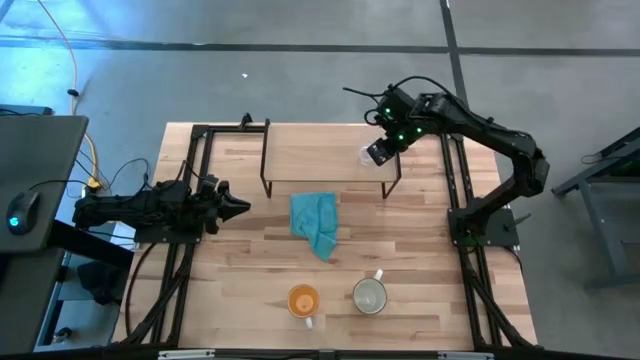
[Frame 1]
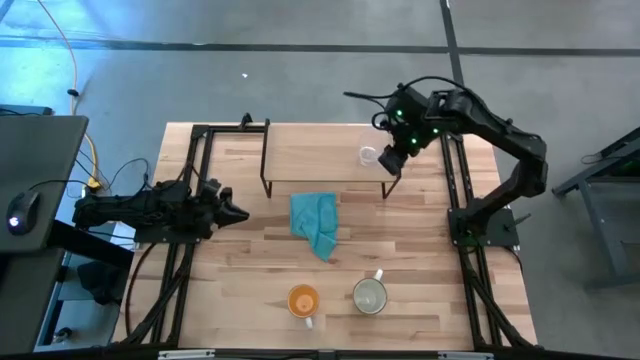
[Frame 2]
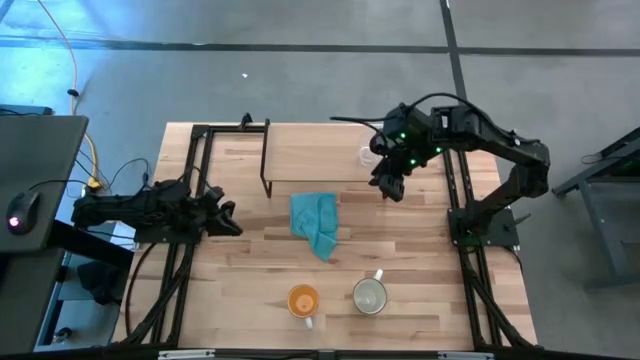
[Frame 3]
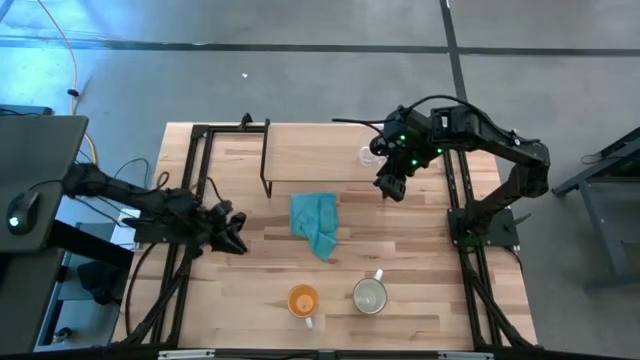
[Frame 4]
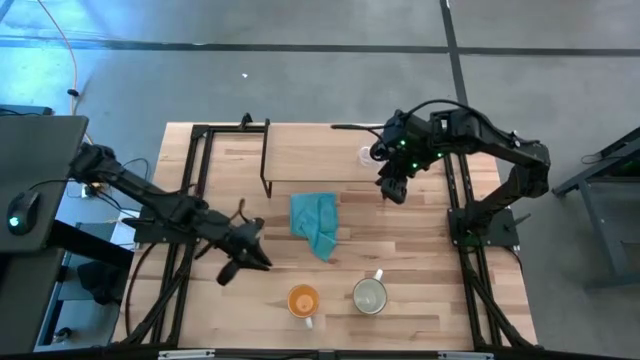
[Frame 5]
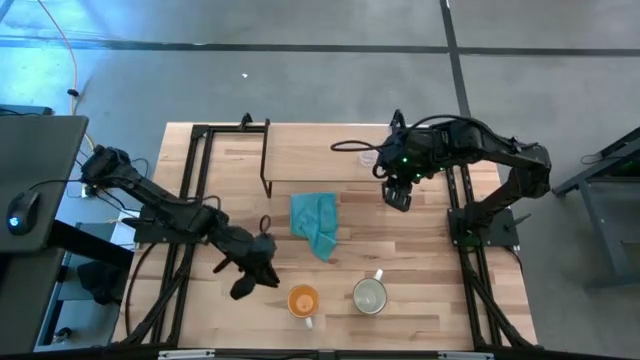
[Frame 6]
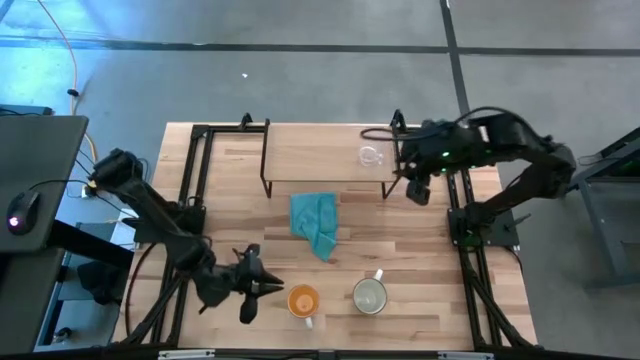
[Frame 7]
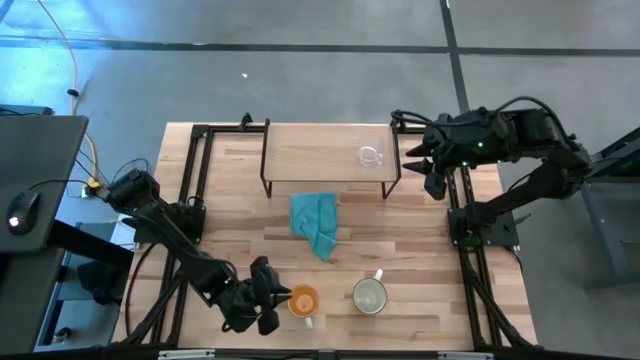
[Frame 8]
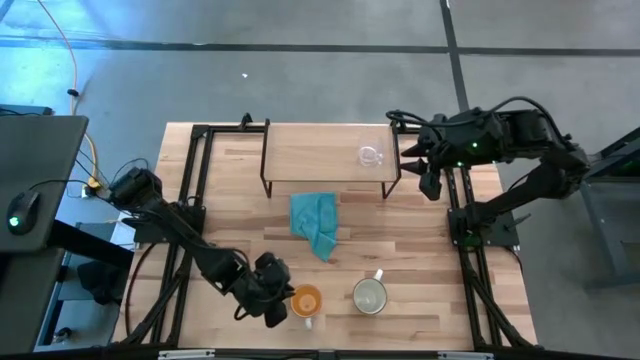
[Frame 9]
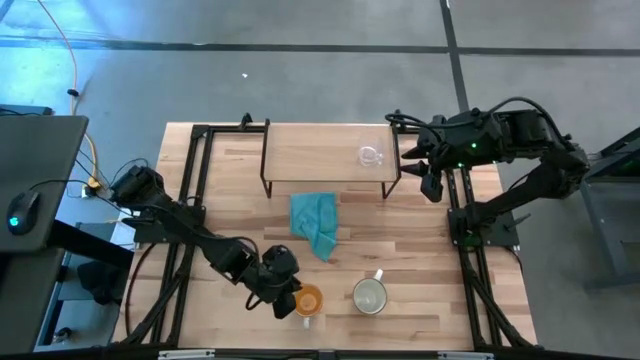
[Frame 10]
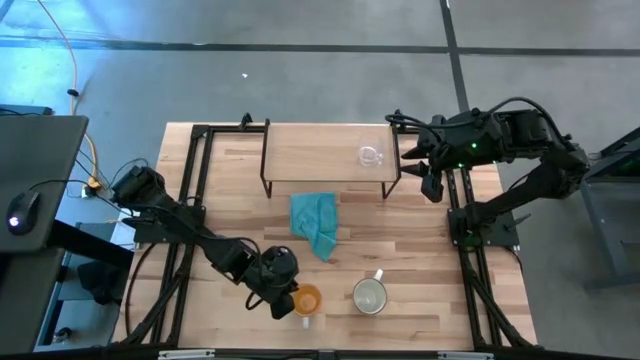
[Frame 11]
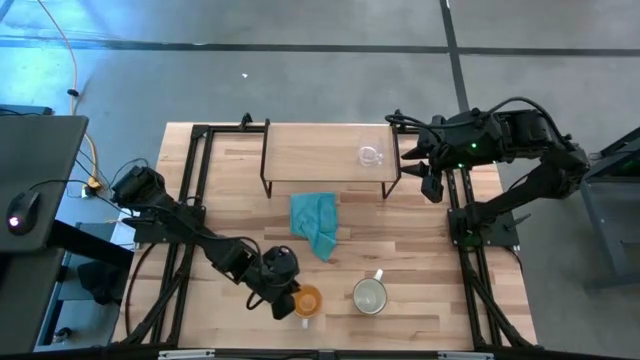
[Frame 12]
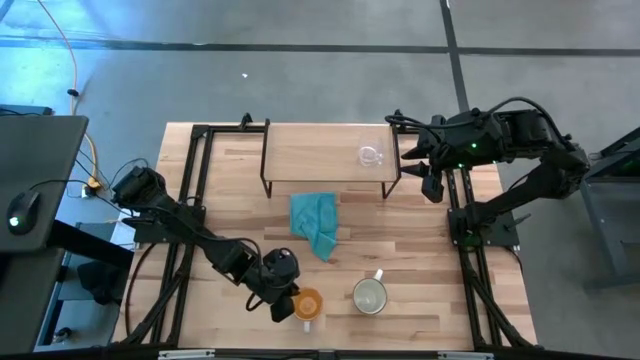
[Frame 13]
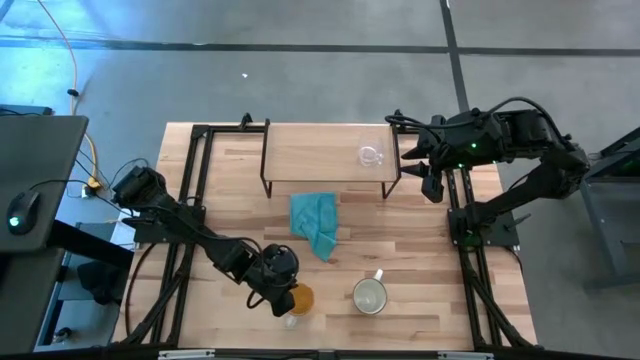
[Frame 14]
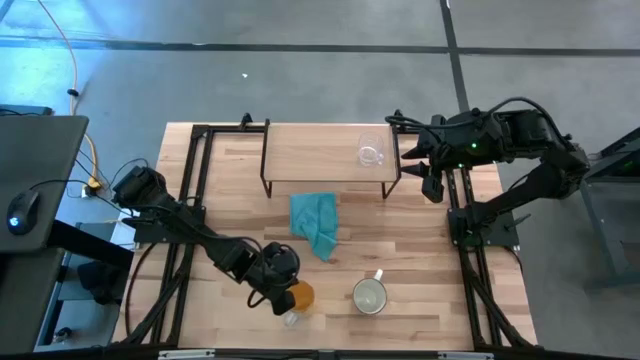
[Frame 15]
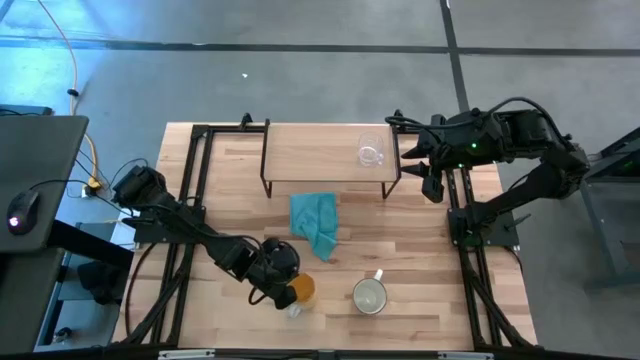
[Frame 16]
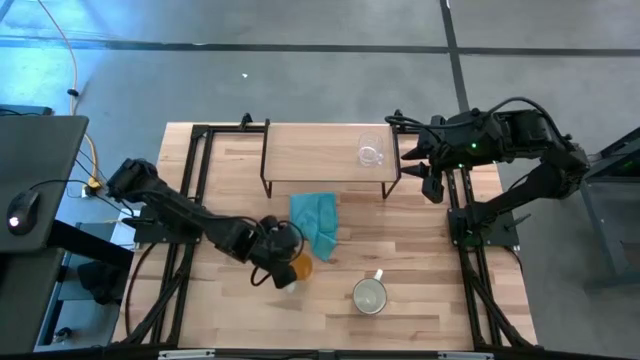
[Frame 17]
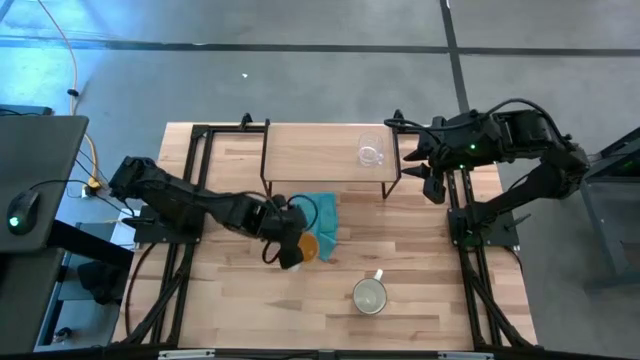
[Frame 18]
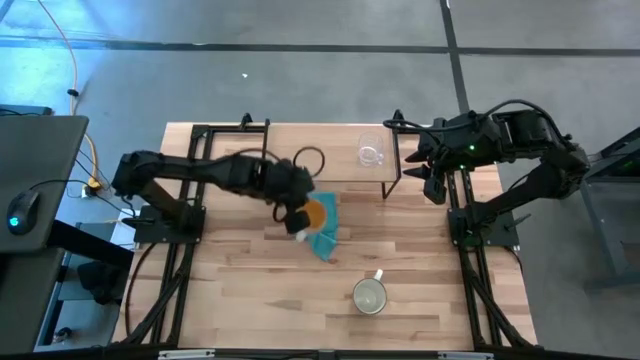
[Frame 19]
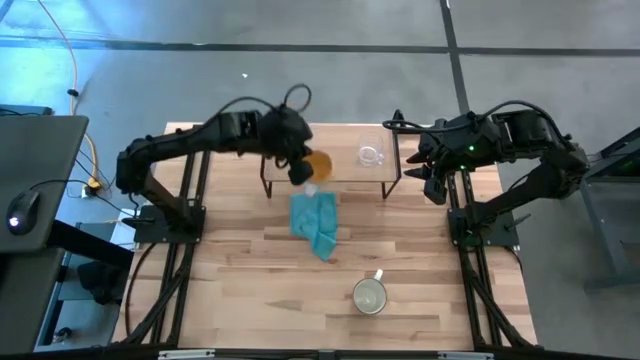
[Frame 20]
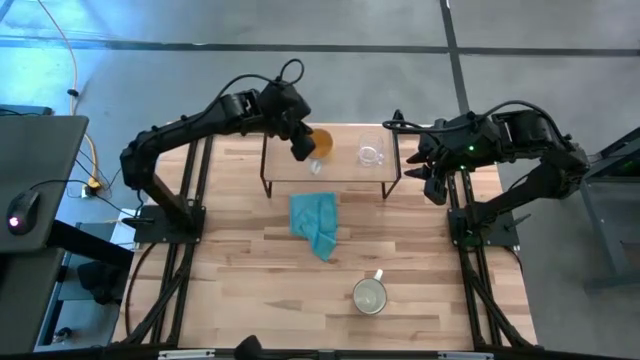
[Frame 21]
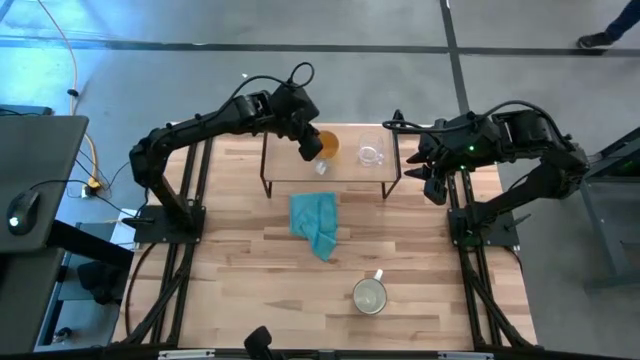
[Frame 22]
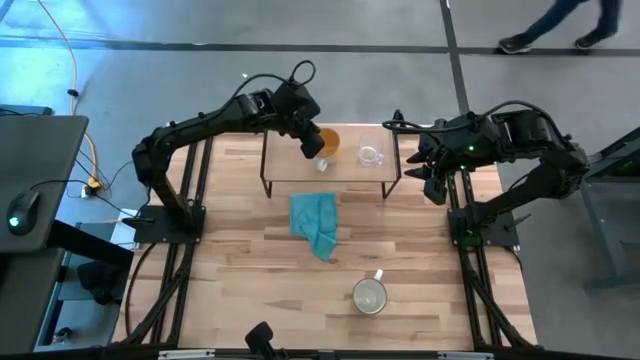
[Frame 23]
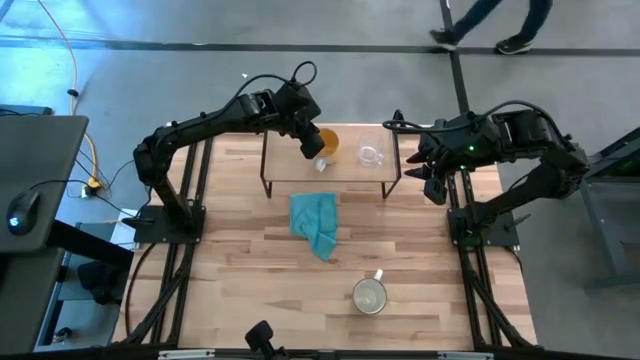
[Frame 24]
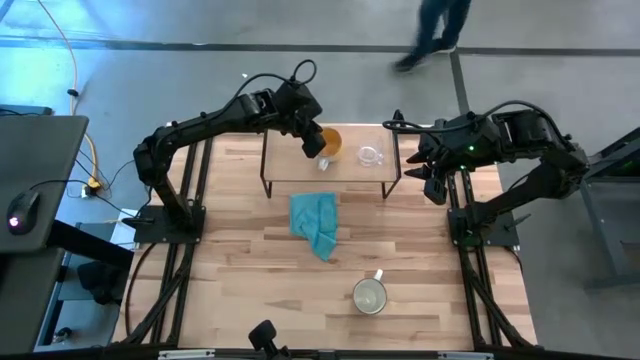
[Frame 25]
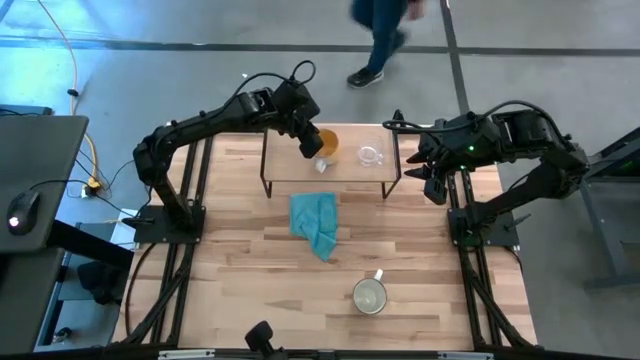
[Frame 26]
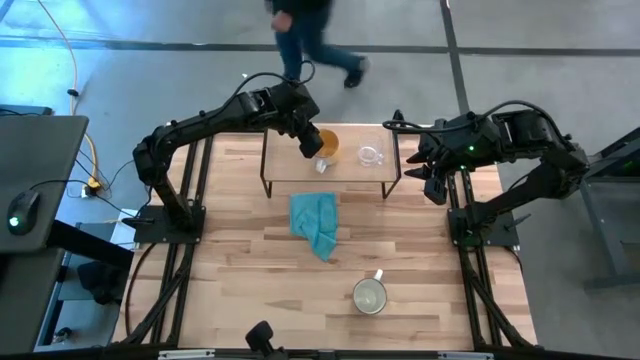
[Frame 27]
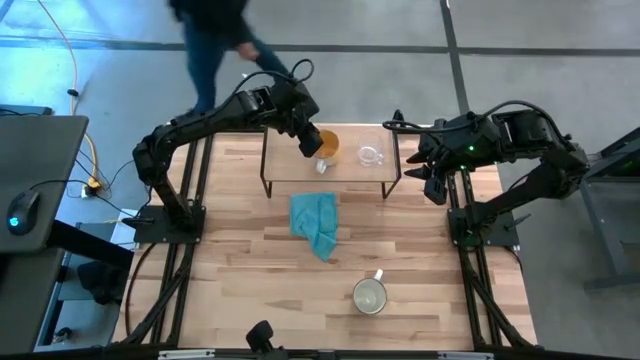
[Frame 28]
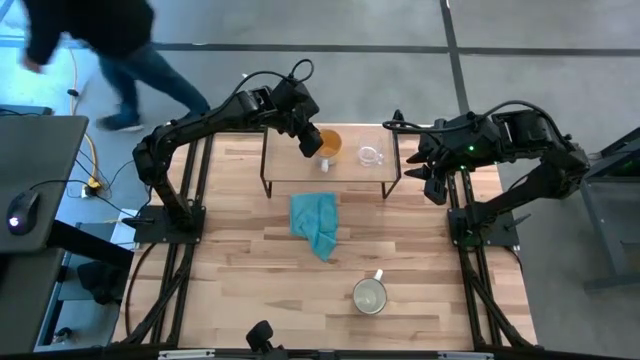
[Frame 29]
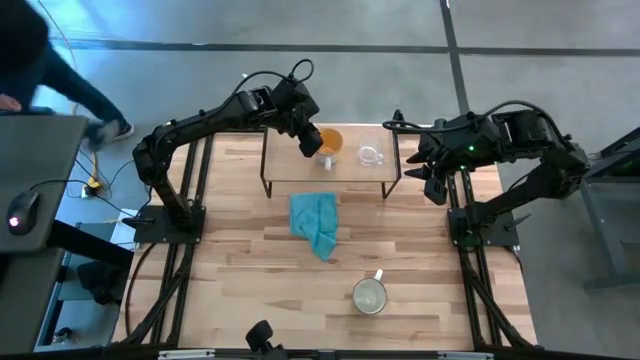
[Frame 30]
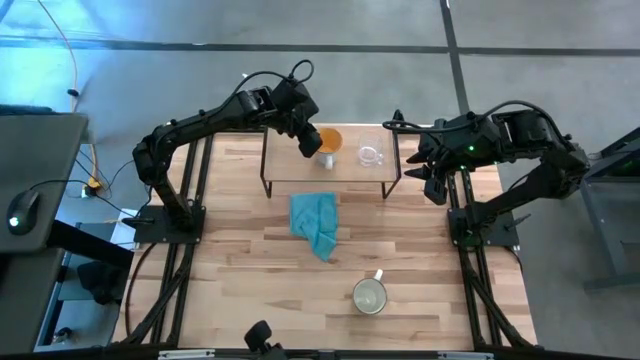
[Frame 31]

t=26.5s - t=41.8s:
Task: Stack small to large cups/mugs on shelf
Put the yellow mug on the shelf
